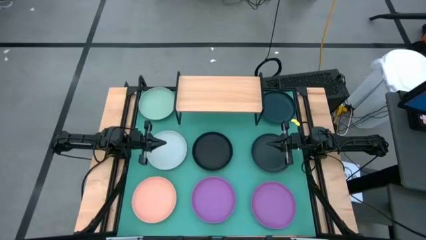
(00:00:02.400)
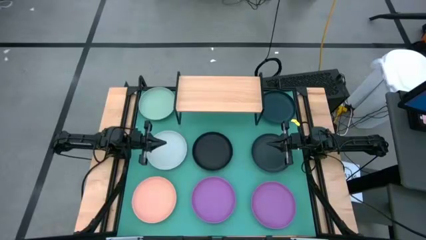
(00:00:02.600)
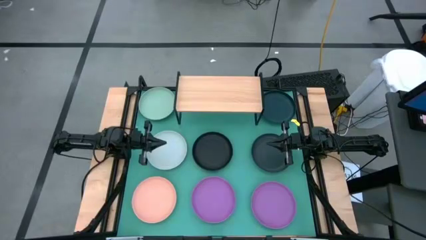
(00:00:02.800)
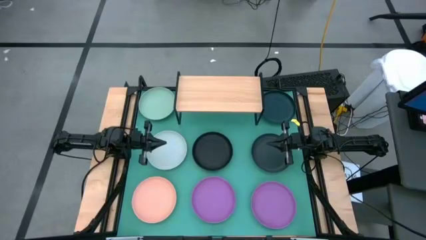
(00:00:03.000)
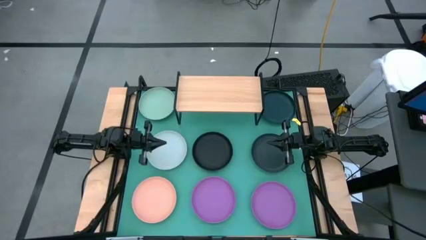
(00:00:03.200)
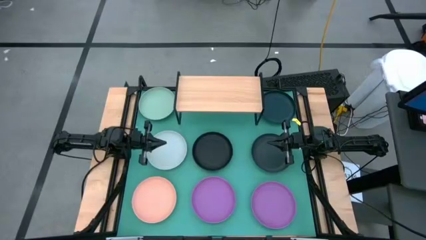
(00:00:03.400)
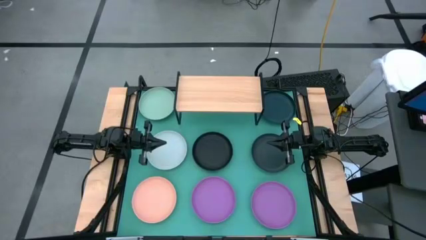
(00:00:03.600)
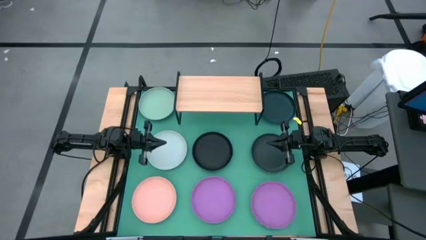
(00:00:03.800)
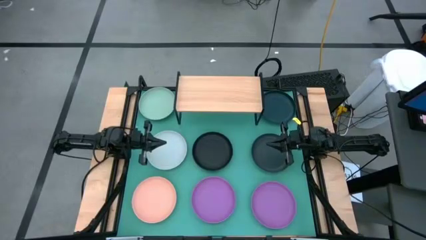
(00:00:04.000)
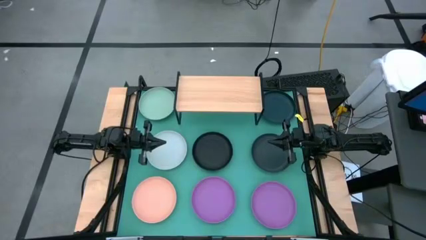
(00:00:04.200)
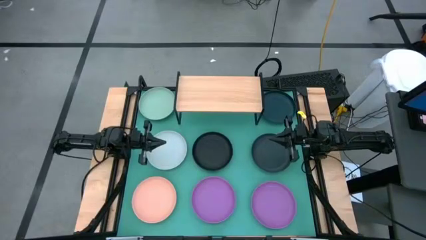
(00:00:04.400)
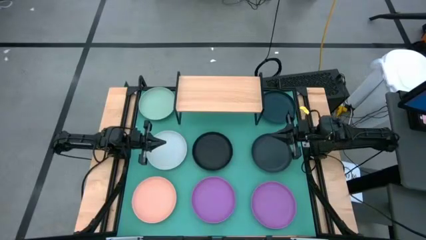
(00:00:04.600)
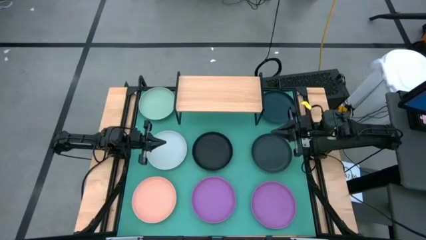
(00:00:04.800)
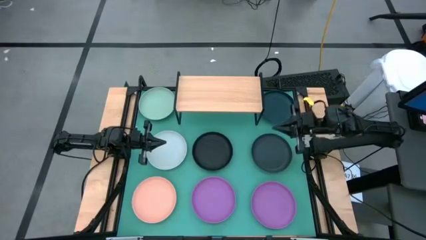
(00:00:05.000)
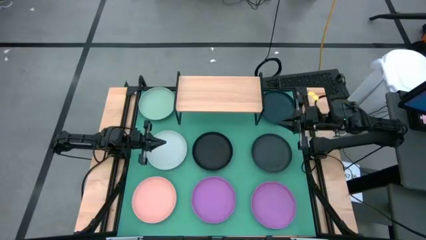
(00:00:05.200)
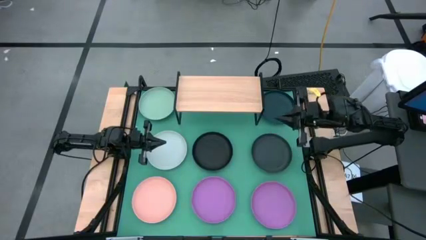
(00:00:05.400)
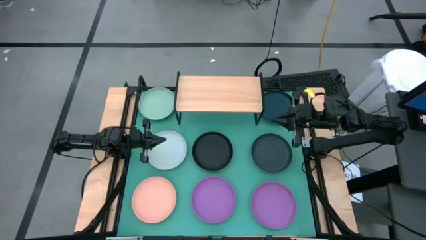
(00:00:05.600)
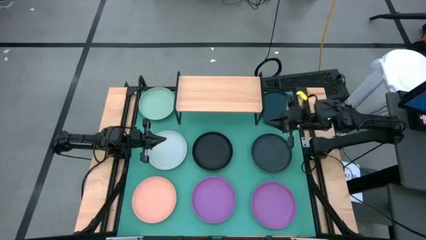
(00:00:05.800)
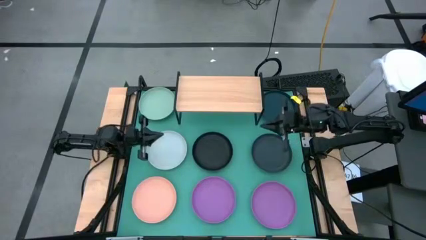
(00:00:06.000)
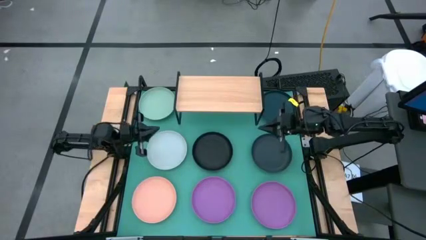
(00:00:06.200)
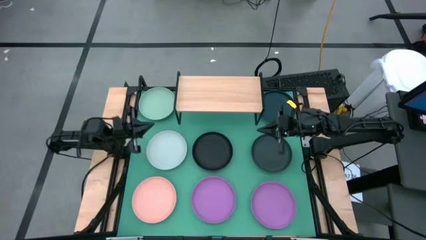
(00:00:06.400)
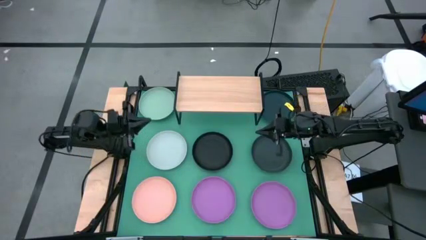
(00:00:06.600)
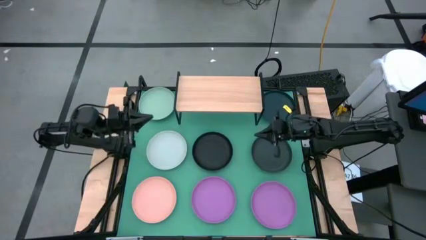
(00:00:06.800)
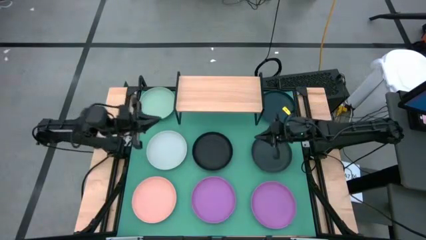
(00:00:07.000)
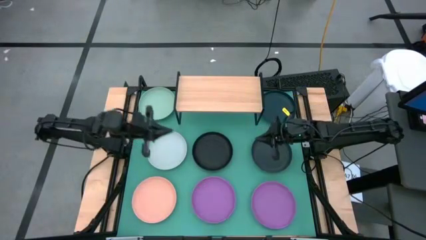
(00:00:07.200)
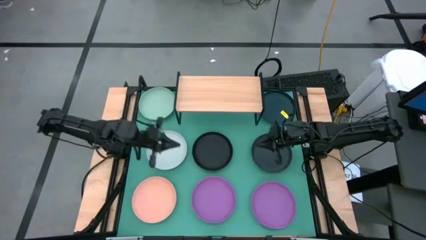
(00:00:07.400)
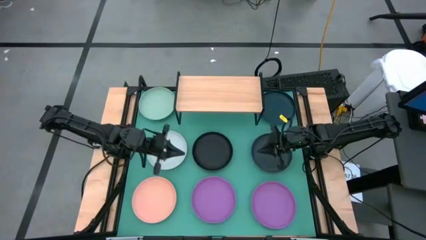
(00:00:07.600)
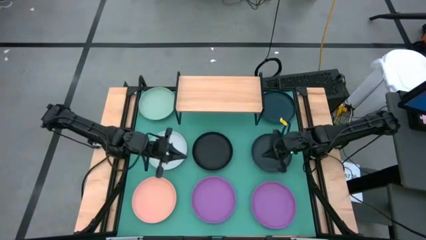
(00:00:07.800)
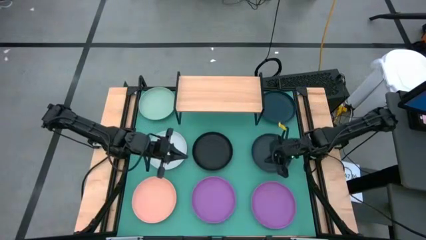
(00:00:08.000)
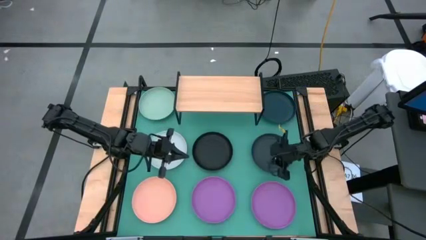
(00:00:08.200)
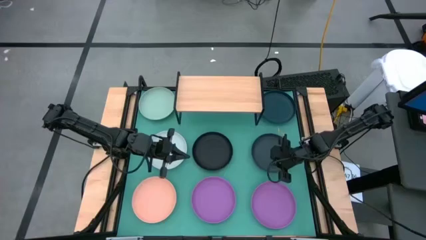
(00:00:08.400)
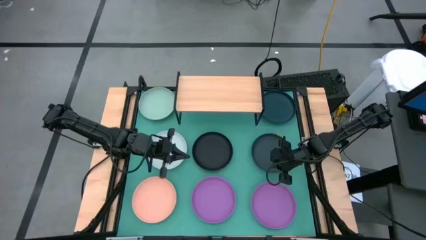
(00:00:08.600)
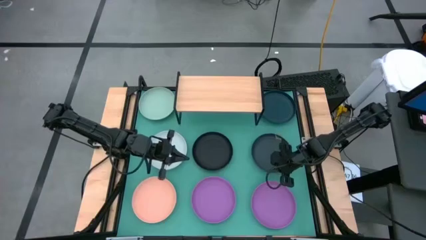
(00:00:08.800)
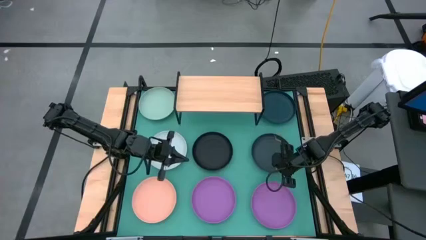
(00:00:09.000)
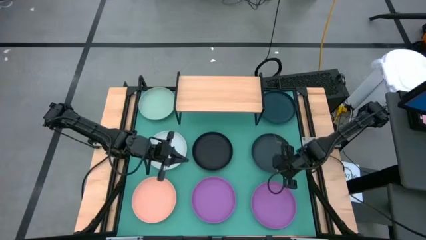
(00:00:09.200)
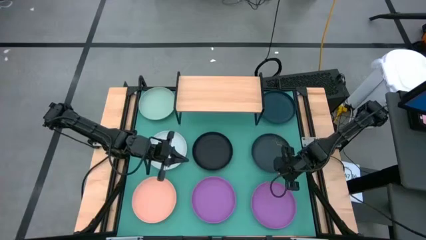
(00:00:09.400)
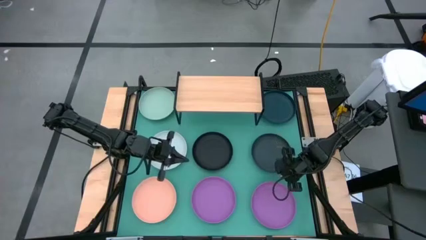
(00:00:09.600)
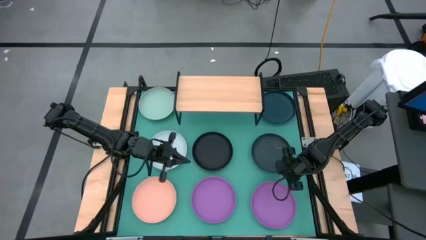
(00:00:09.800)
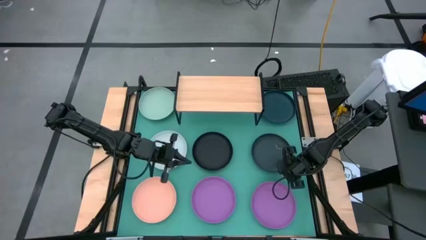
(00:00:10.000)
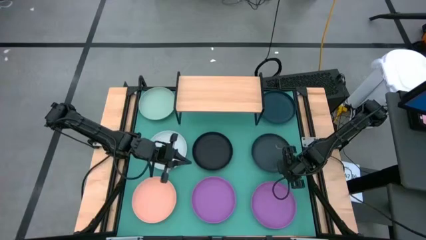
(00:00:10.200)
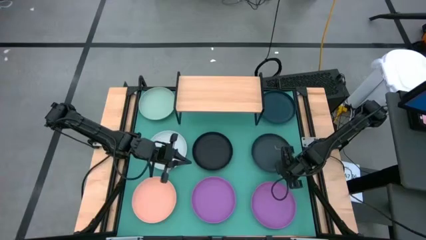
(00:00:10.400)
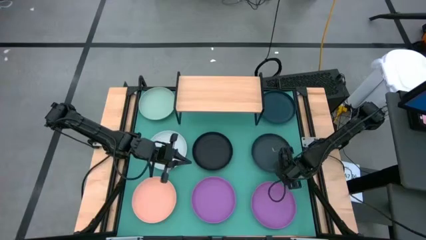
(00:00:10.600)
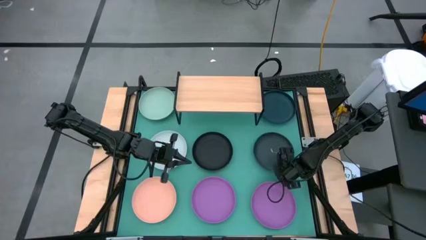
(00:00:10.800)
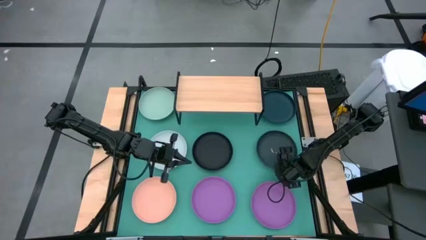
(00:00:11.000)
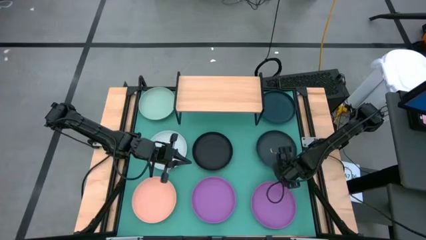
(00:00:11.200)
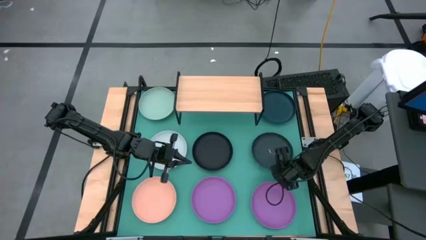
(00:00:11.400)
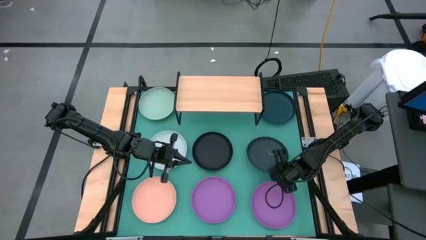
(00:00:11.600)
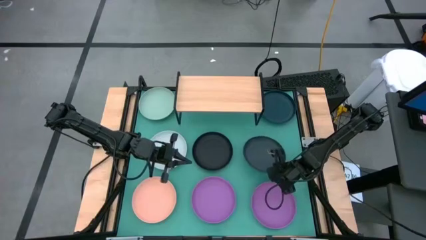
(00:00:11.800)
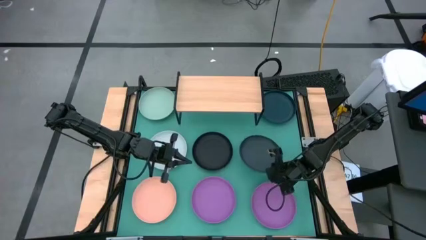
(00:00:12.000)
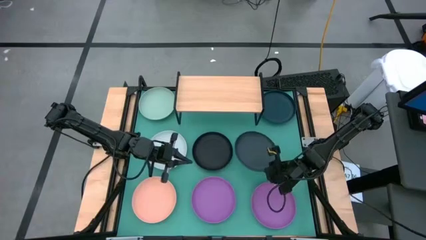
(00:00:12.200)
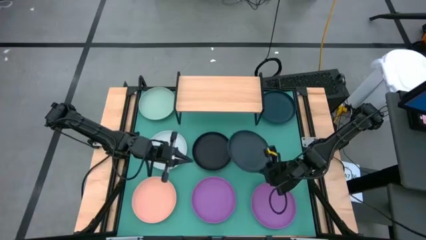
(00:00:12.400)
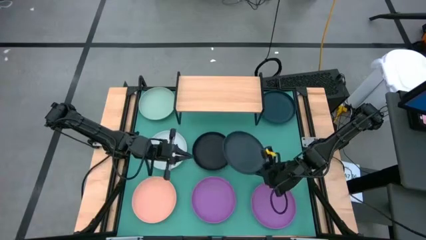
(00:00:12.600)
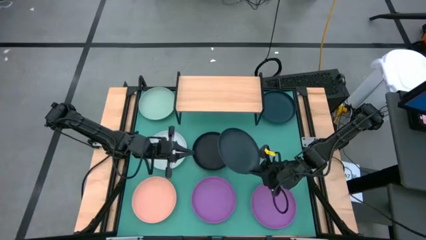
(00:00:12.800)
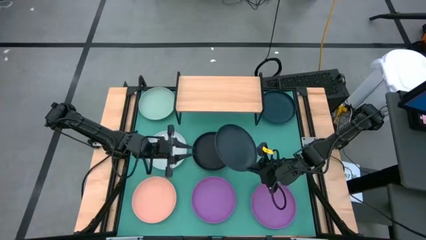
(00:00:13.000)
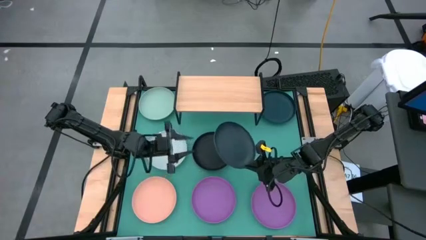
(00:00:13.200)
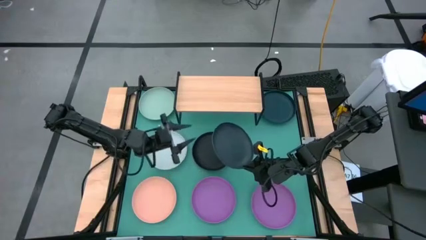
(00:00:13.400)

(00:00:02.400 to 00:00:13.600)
Task: Place and stack plates onto a shelf
Put the bottom dark blue plate on the shelf

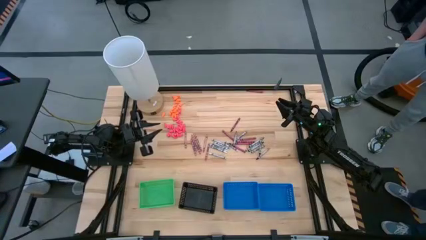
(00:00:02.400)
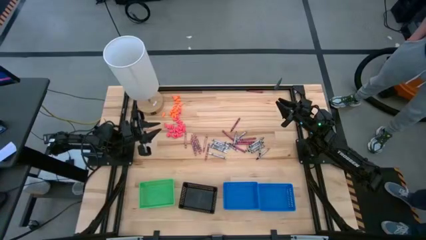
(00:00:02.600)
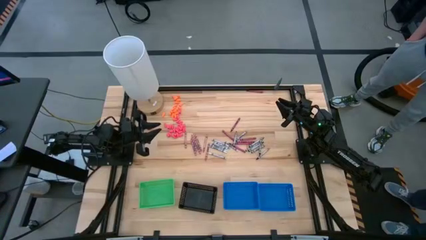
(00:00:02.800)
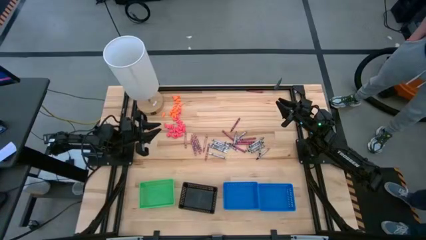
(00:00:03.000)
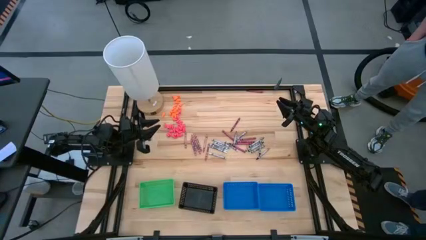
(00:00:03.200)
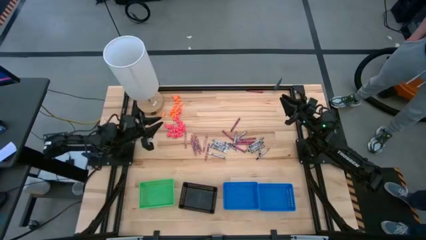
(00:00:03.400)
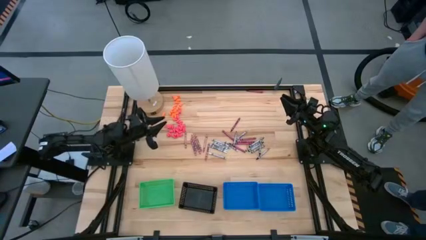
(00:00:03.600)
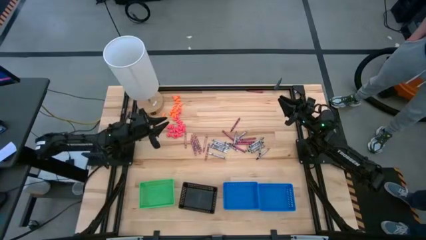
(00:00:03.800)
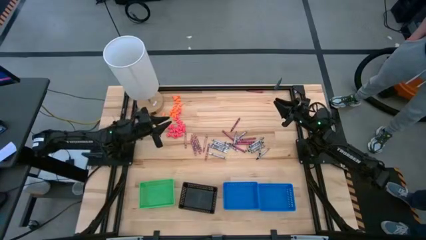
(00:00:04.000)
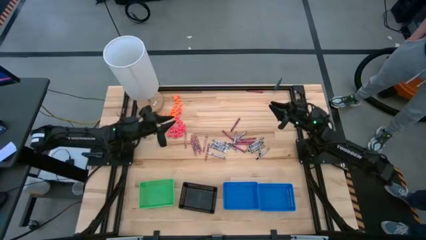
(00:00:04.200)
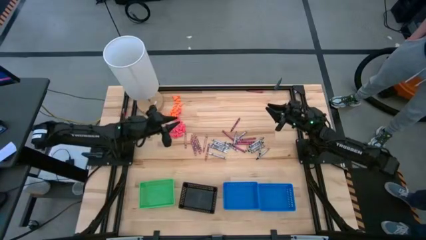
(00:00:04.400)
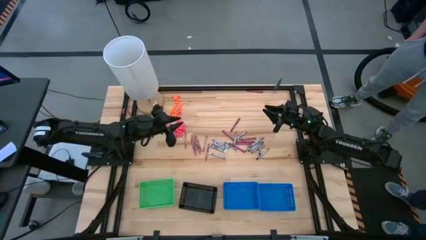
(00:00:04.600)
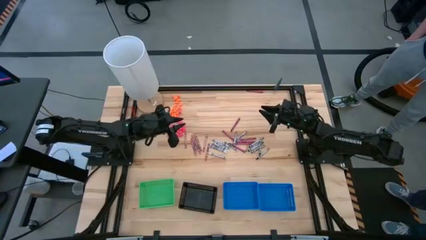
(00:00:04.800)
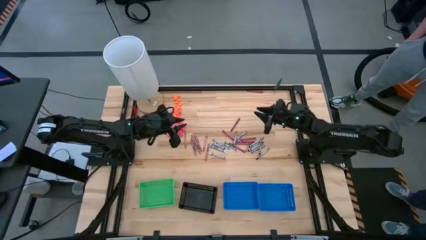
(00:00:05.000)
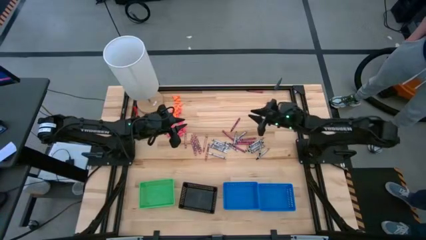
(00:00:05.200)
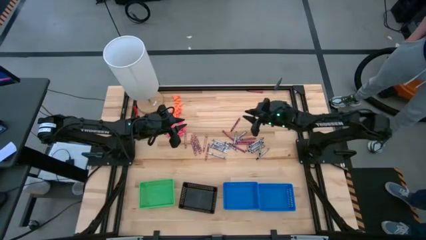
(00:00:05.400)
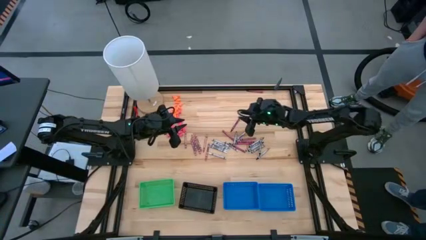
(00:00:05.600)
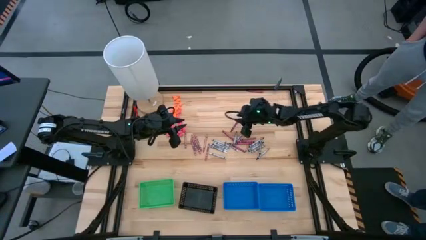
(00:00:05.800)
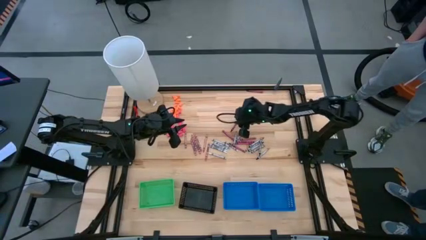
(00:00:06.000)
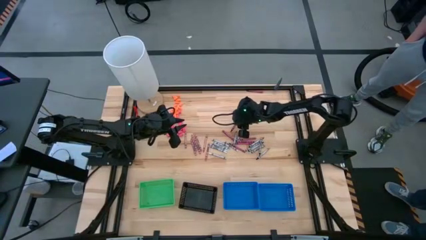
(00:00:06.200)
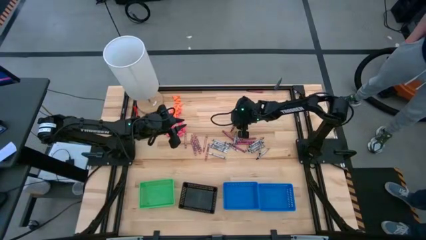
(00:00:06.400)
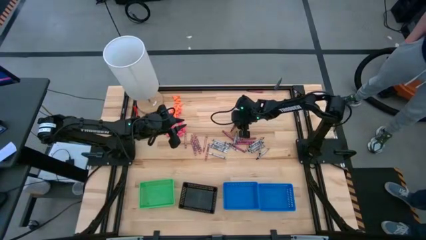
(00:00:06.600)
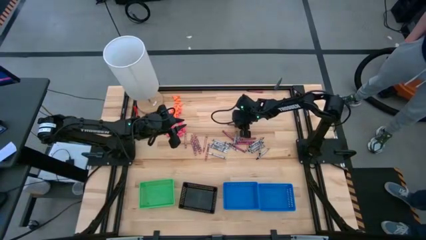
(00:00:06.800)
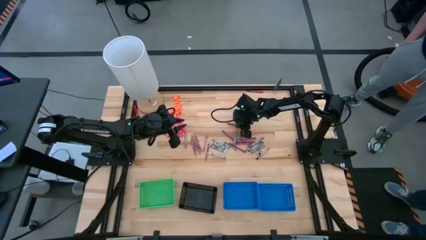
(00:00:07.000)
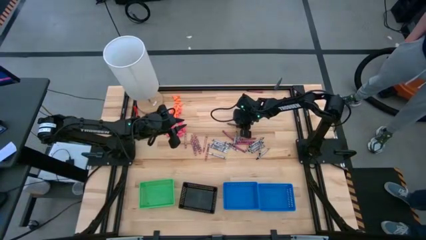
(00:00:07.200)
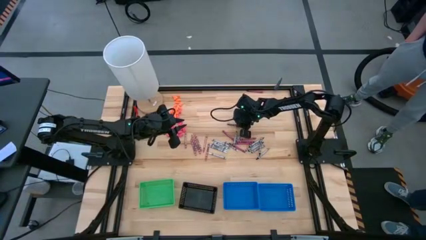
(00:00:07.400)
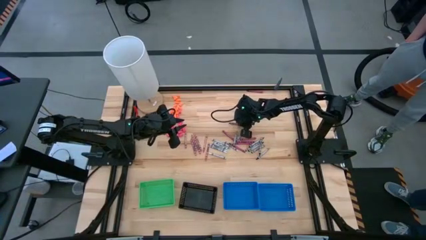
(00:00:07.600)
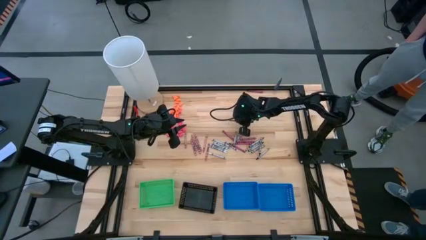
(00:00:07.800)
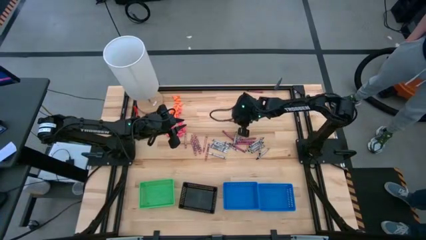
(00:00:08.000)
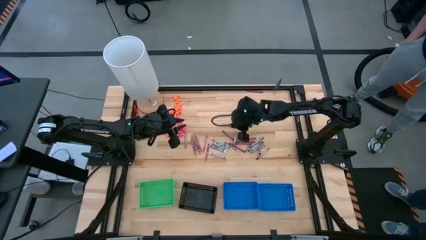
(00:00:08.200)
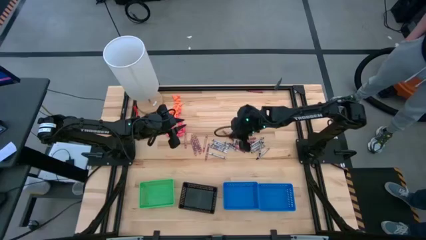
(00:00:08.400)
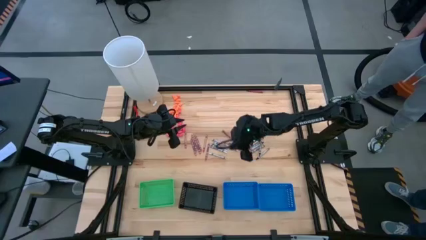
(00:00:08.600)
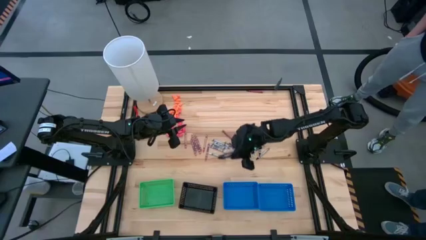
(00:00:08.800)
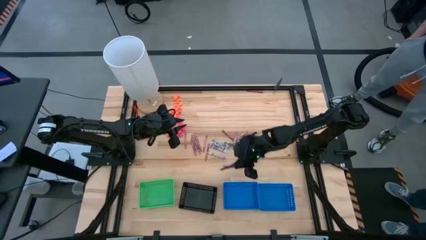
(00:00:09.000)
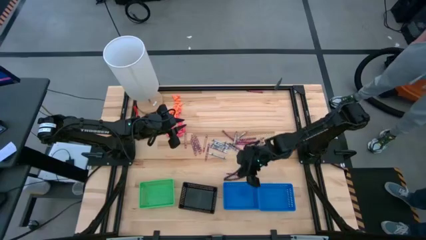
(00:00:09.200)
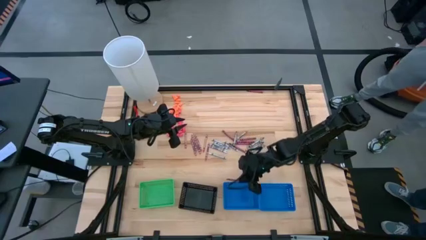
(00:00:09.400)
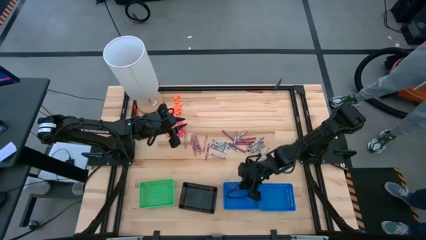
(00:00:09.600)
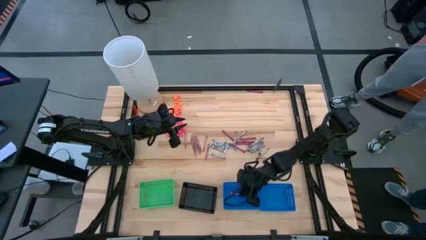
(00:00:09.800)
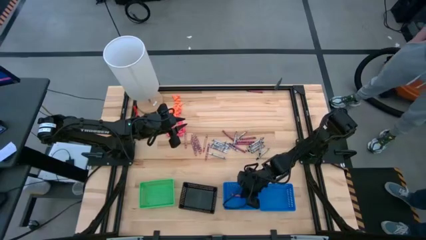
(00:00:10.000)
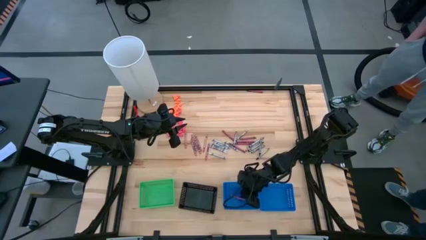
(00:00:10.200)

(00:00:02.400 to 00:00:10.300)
Task: Sort crayons
Put the red crayon into the left blue bin
